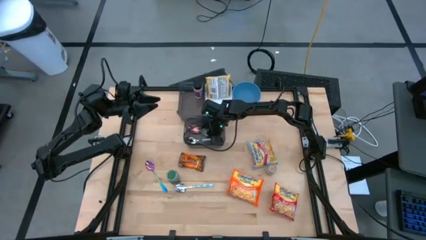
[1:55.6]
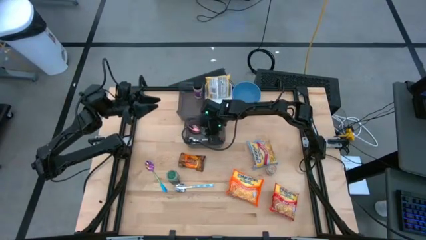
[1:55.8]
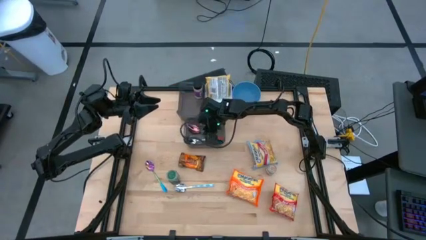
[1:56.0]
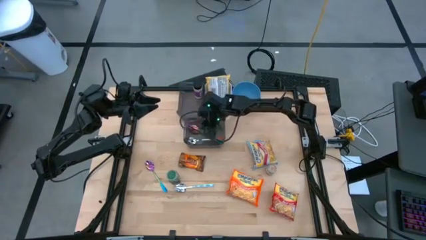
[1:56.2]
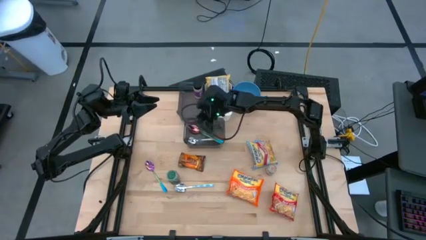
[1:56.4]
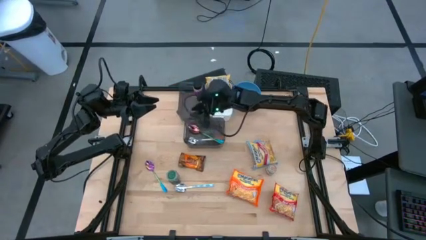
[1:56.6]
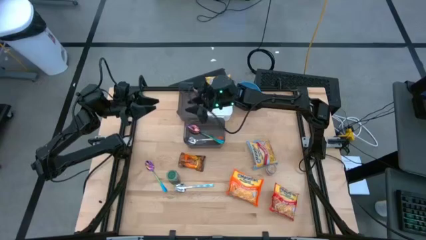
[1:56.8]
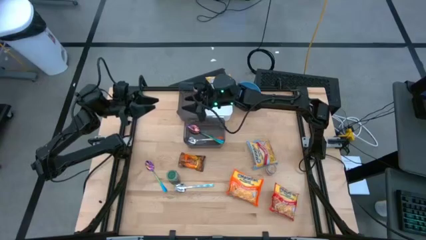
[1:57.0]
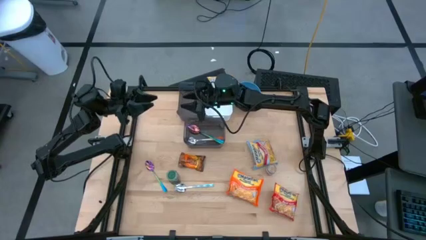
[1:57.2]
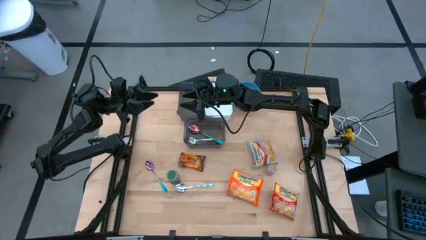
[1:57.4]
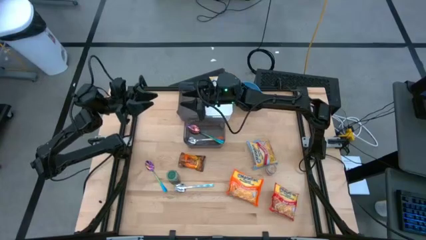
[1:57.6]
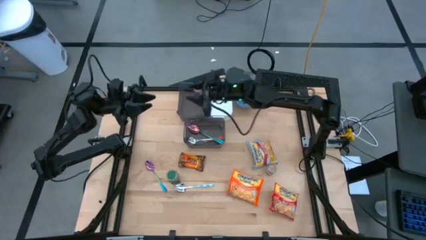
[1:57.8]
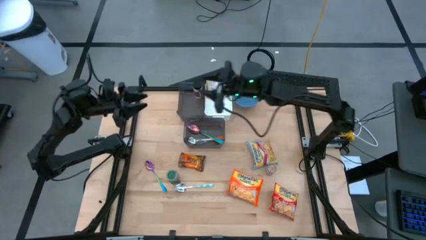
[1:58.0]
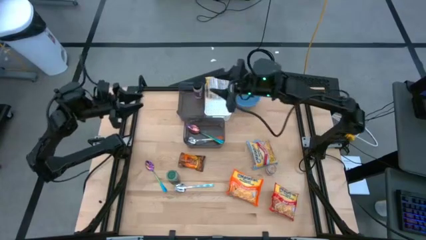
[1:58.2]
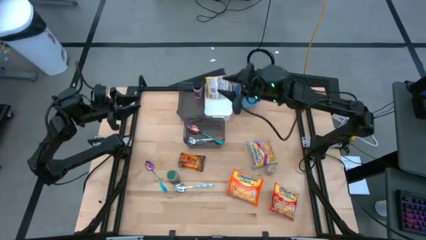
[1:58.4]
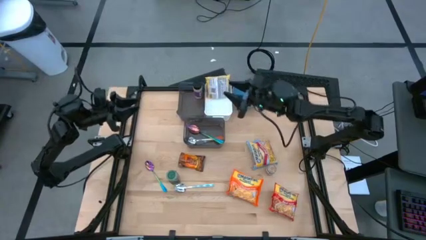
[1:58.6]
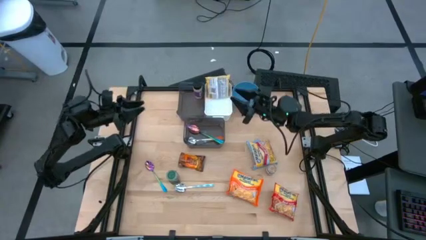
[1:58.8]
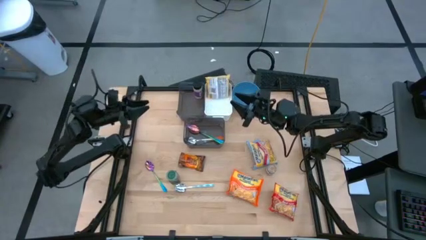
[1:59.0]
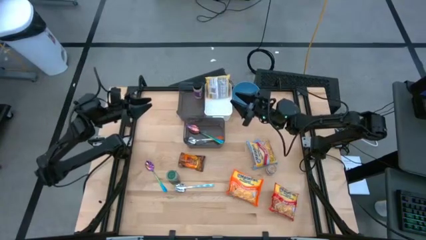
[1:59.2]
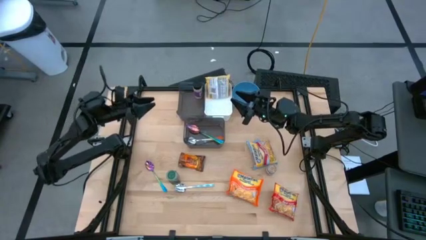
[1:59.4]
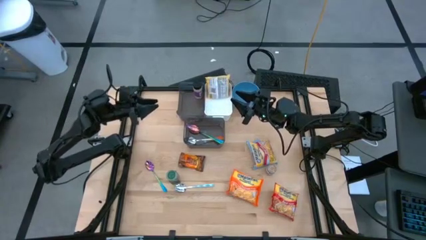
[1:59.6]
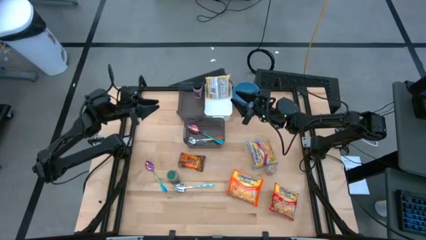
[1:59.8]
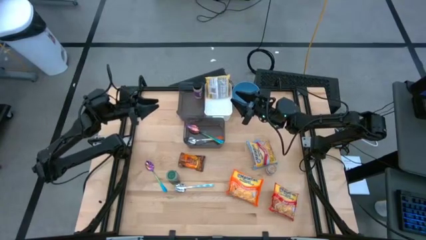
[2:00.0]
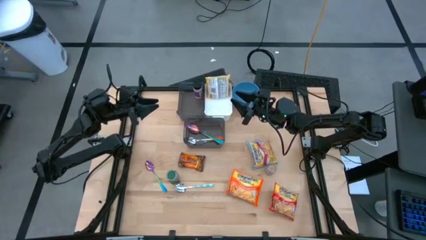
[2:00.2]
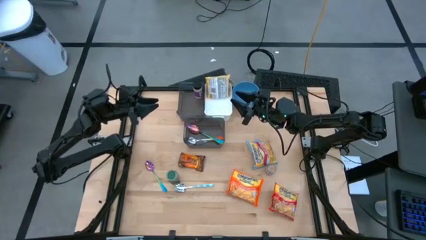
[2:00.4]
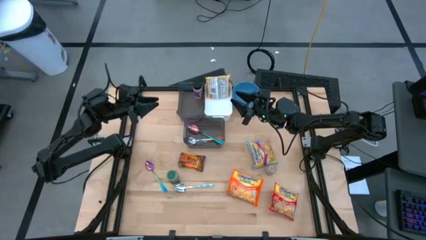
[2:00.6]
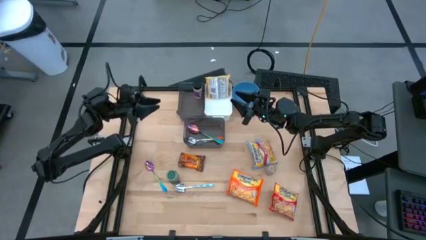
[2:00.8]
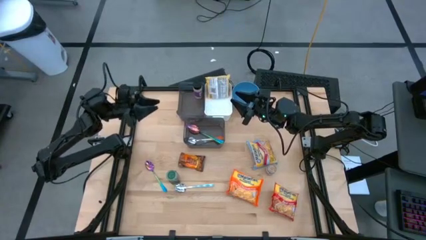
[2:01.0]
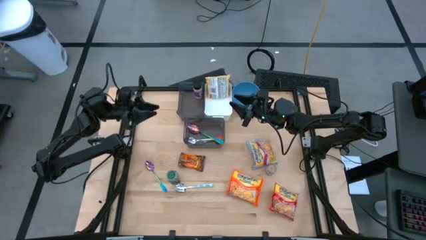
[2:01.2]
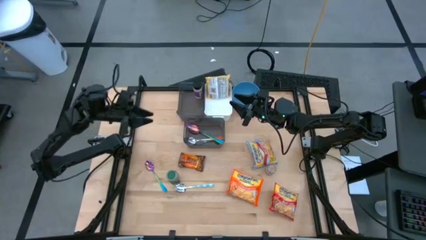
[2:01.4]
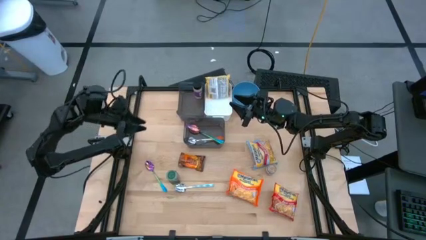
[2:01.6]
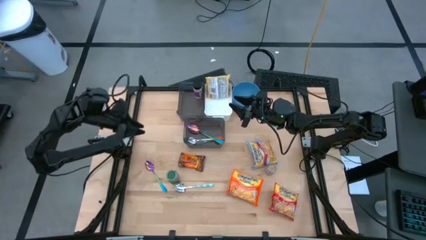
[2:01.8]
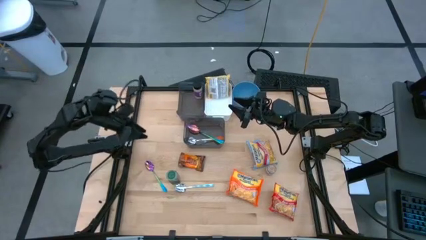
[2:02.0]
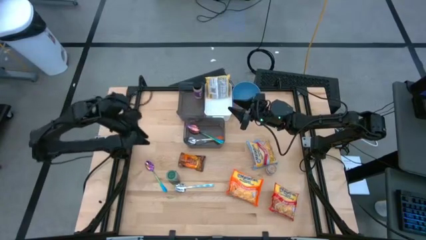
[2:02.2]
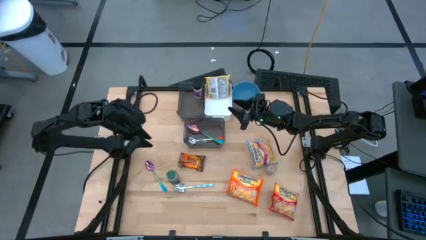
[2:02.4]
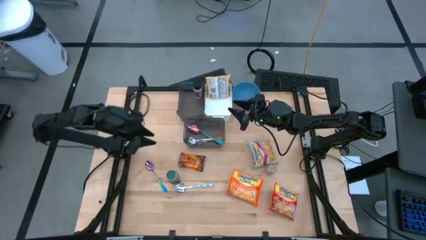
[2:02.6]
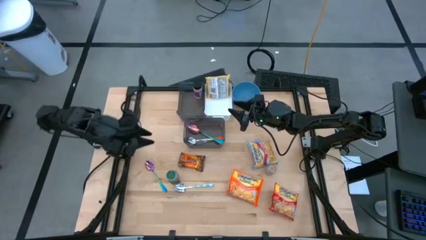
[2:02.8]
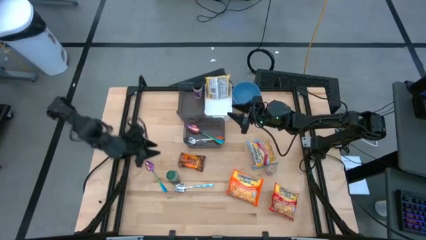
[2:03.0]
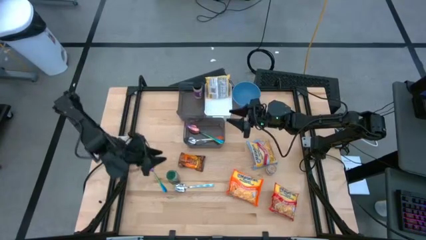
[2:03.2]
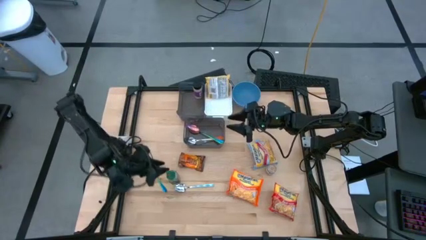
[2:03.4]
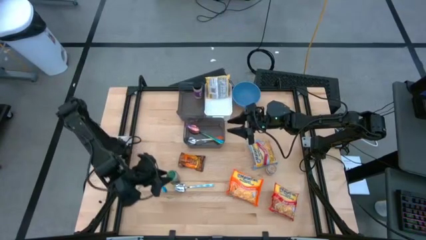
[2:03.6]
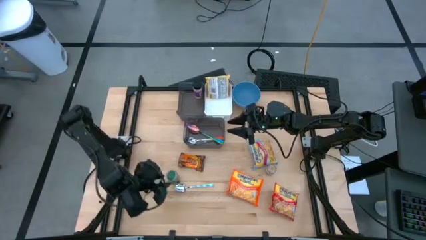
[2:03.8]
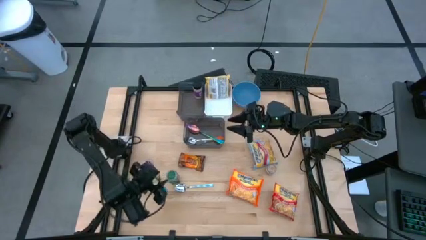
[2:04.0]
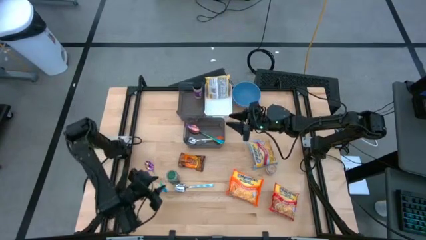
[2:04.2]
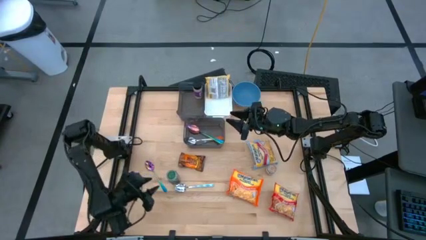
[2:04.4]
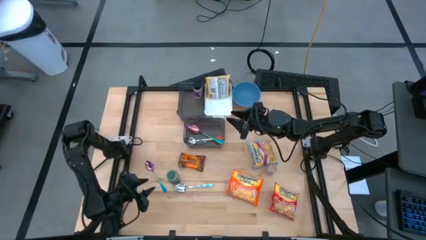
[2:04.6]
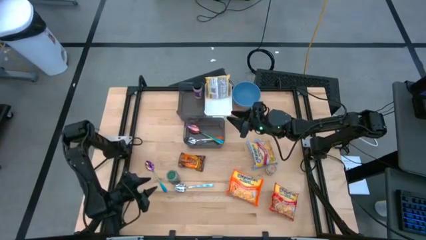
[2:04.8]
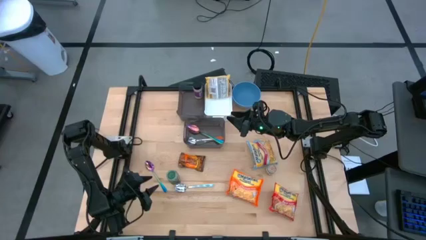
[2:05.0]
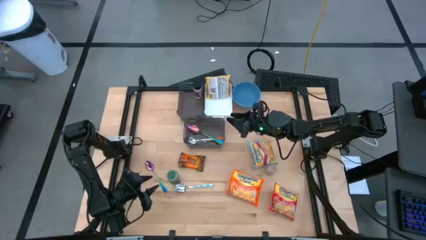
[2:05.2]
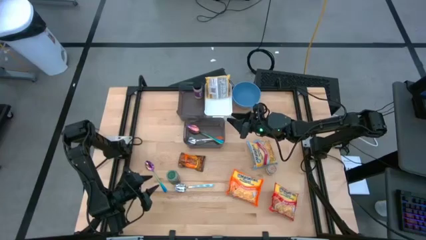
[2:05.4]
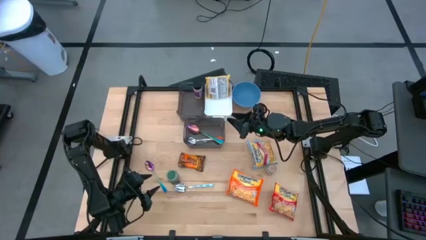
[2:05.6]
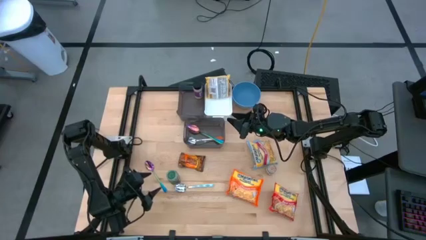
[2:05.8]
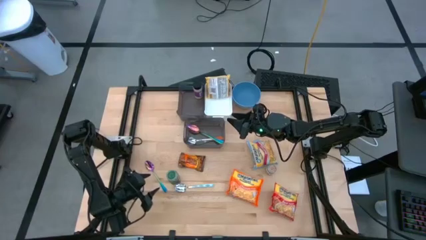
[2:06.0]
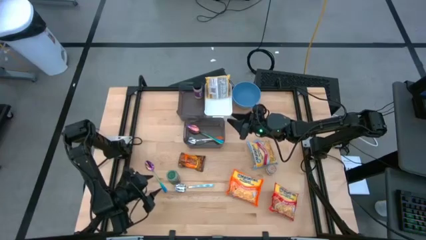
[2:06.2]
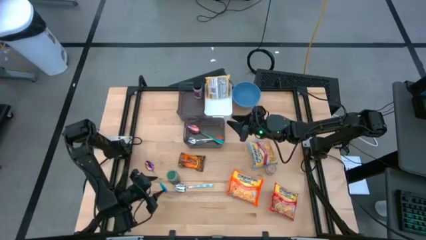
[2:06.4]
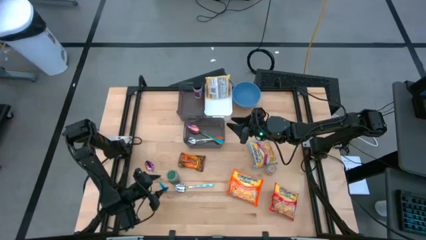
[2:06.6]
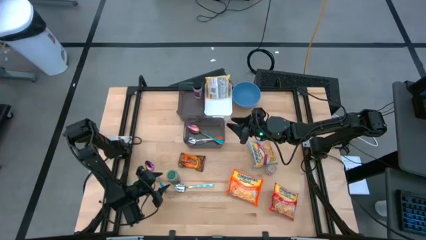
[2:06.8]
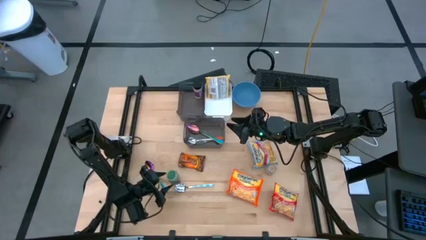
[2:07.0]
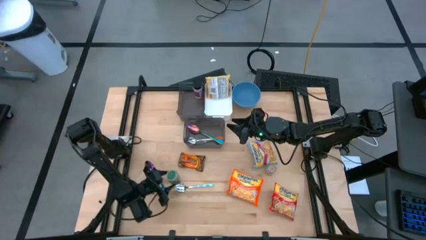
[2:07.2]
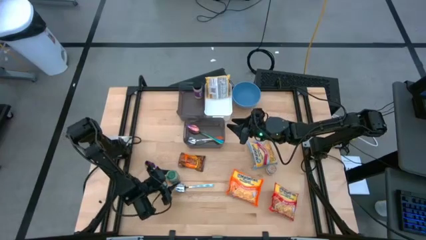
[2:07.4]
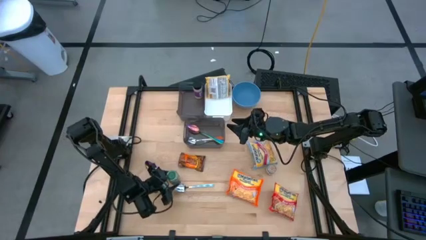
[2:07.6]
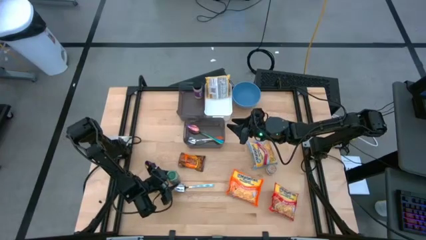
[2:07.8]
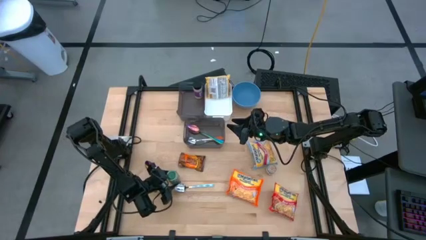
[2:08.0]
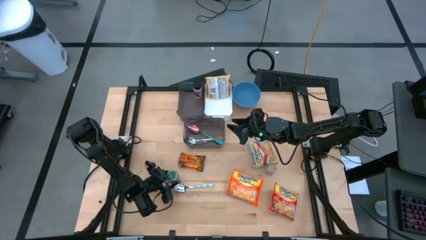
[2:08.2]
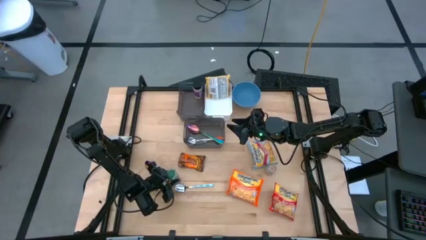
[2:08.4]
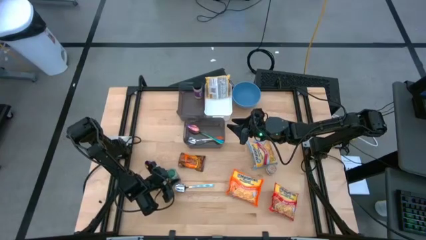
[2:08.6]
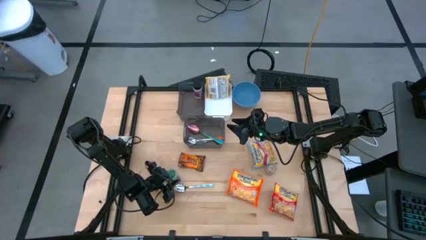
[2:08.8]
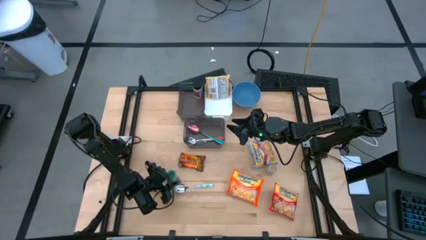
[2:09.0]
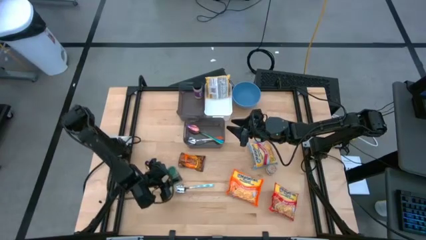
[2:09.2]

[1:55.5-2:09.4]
Task: Pick & Place Food Item
Put the green seasoning bottle into the top black bin

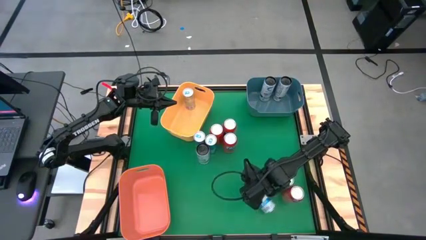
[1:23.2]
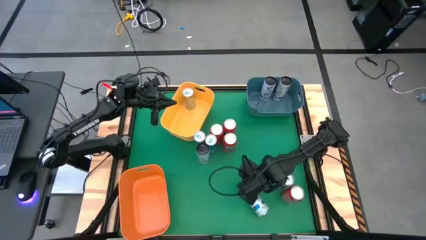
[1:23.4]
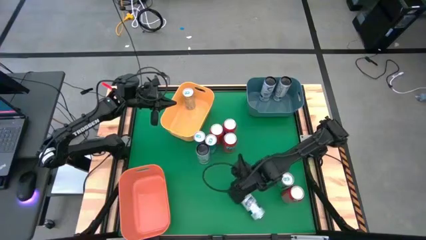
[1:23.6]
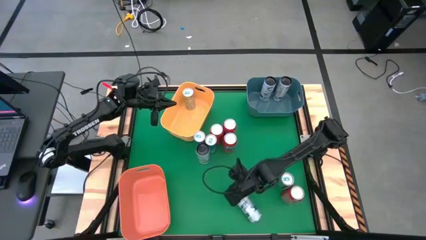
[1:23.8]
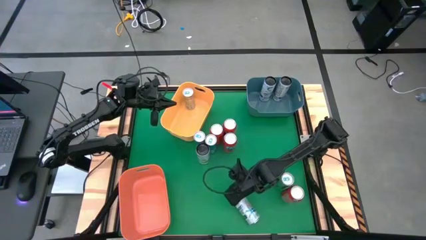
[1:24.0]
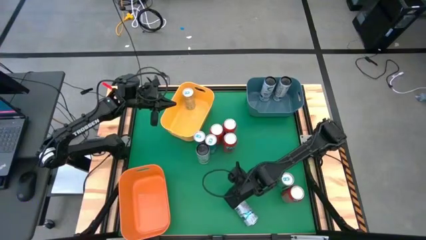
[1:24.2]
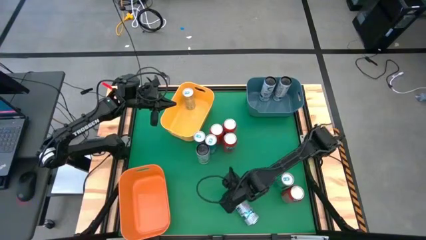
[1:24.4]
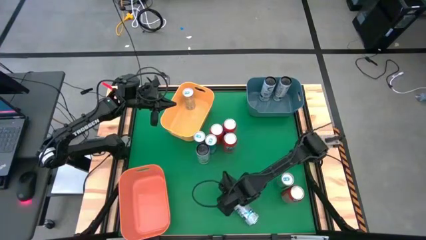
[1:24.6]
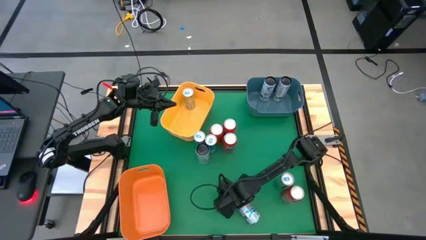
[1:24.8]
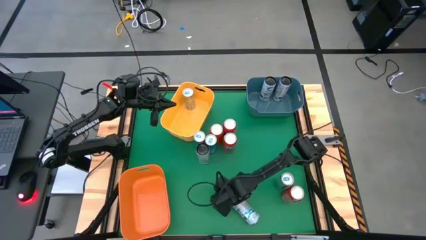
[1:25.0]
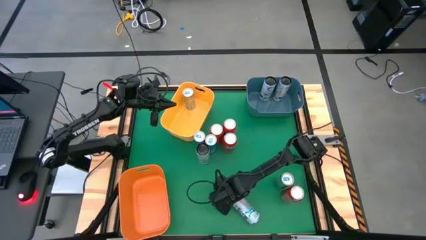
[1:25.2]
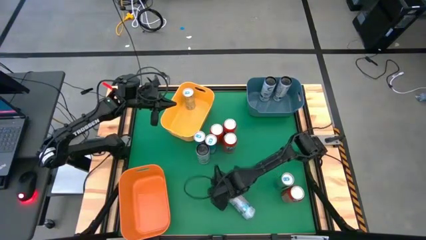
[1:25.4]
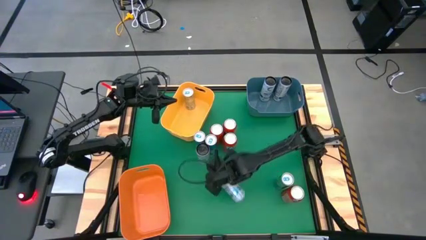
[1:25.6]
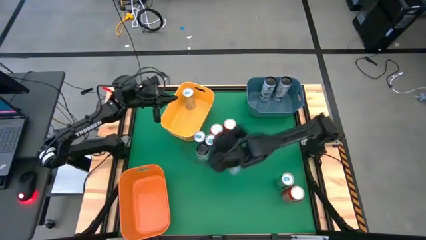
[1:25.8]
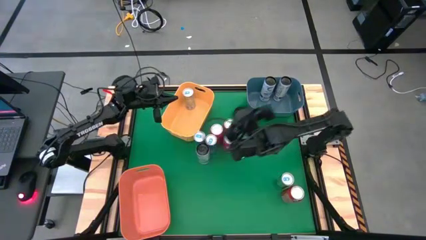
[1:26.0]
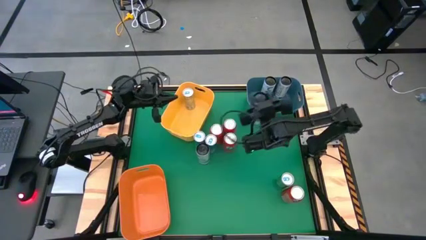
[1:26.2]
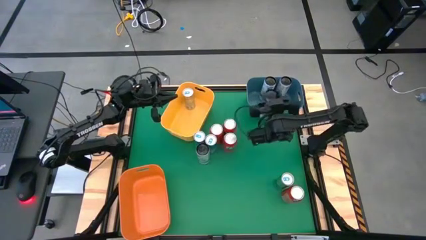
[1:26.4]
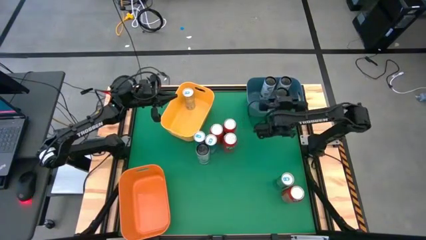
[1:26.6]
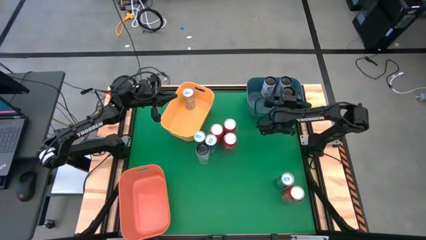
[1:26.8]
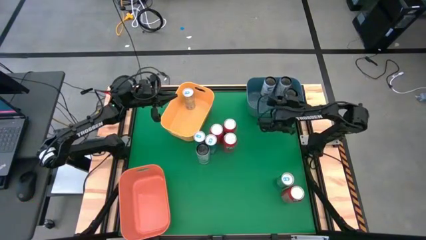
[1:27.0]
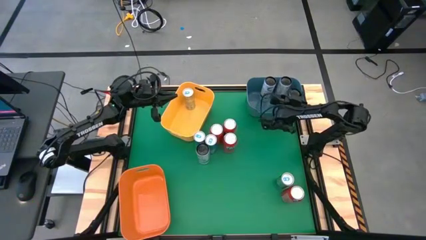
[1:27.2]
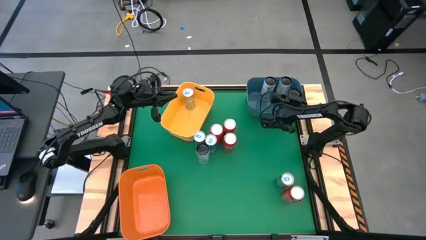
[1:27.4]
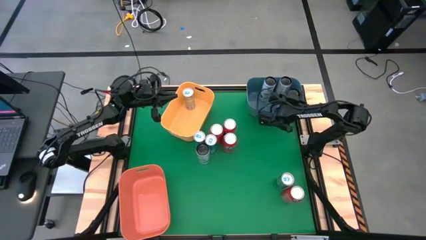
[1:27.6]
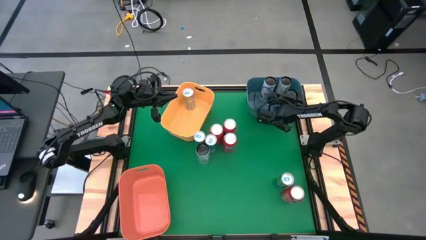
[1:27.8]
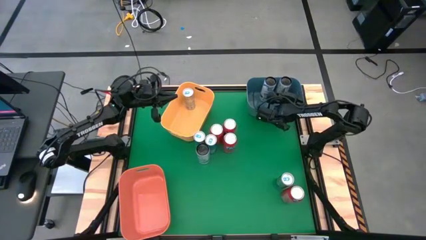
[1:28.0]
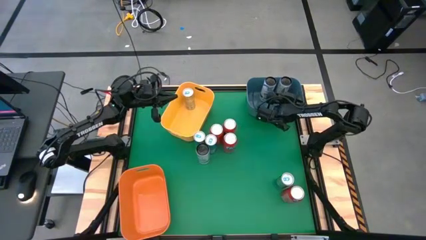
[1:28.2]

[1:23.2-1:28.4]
Task: Sort soda cans
Put the white blue soda can into the blue bin
